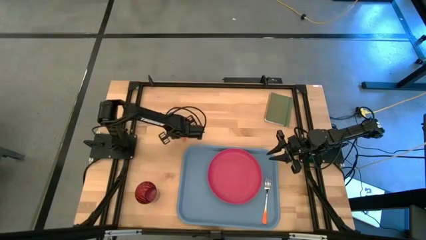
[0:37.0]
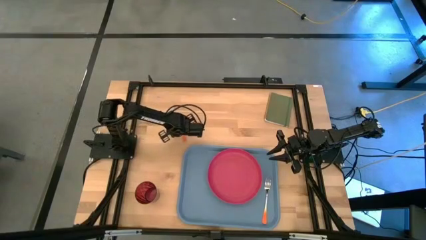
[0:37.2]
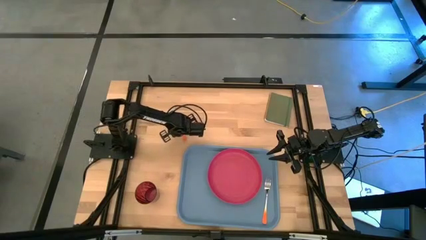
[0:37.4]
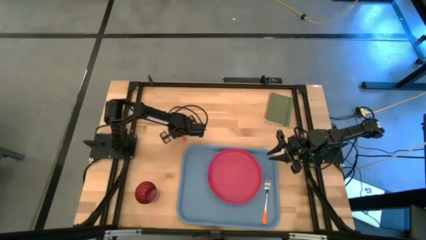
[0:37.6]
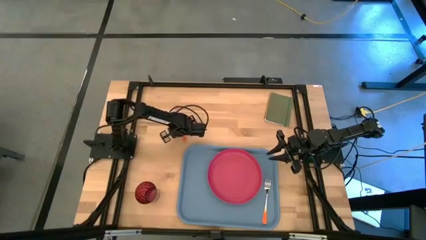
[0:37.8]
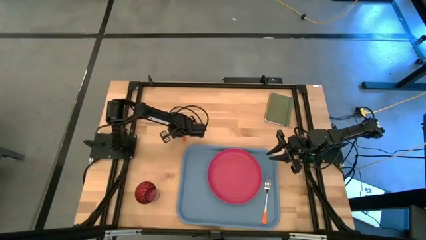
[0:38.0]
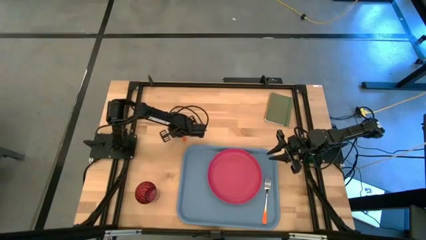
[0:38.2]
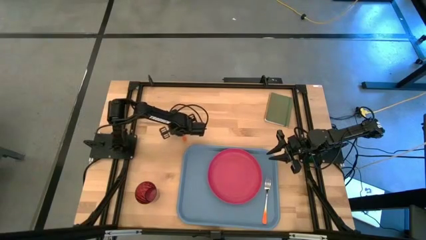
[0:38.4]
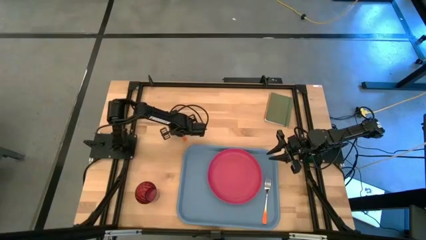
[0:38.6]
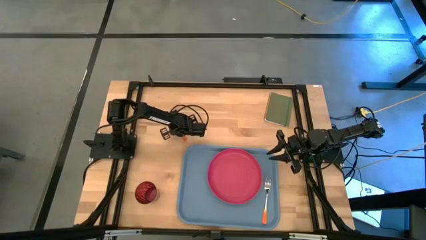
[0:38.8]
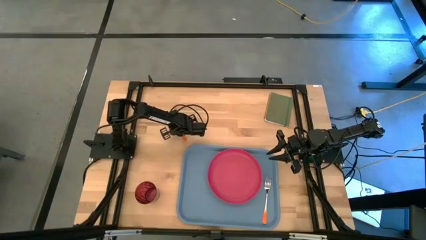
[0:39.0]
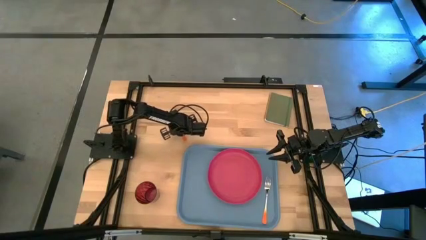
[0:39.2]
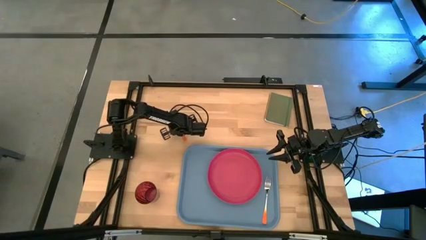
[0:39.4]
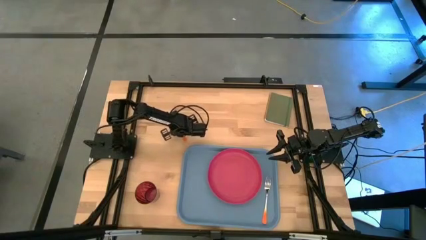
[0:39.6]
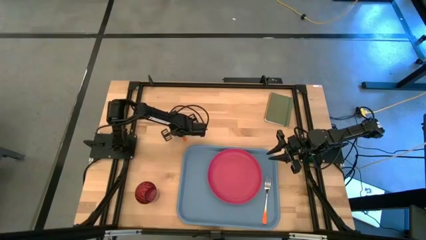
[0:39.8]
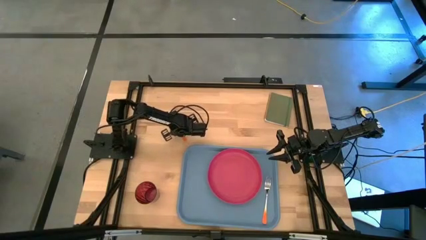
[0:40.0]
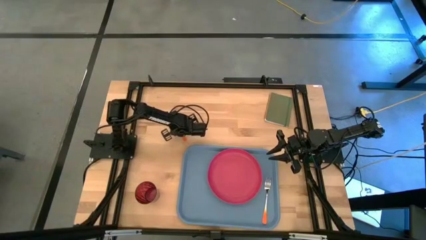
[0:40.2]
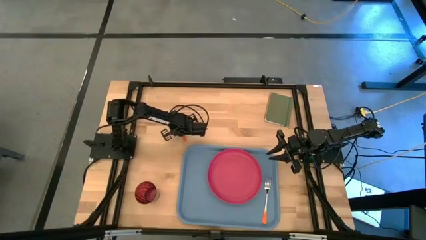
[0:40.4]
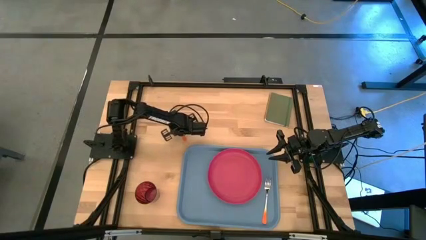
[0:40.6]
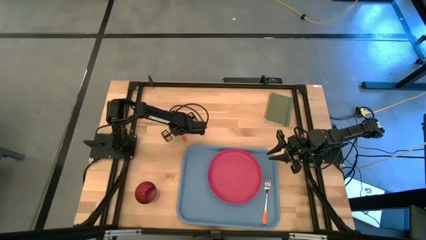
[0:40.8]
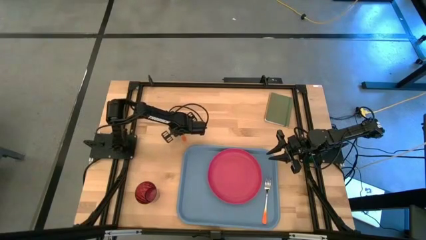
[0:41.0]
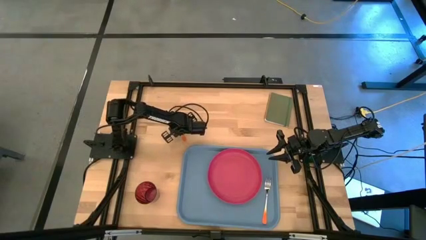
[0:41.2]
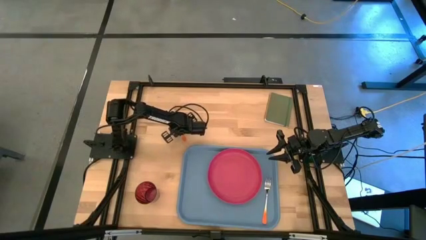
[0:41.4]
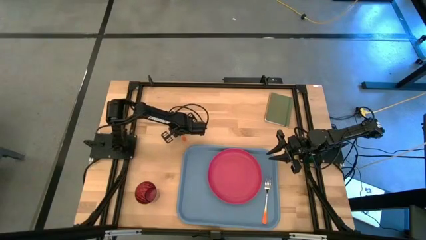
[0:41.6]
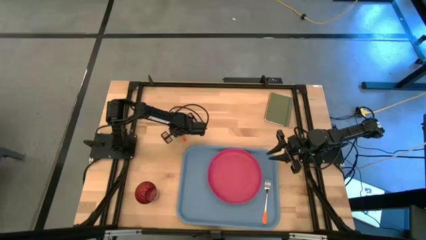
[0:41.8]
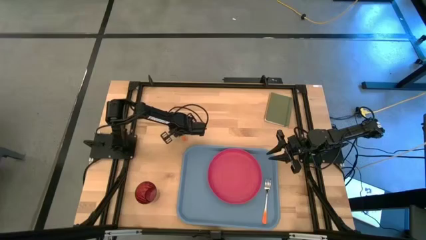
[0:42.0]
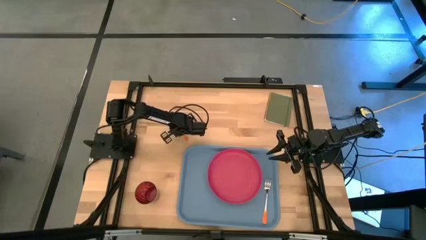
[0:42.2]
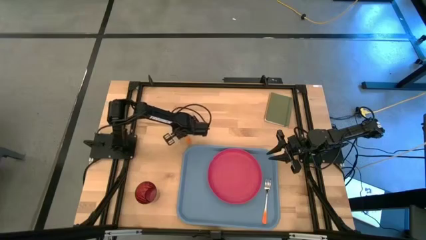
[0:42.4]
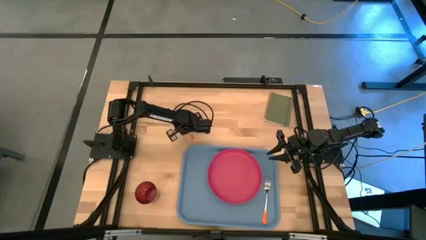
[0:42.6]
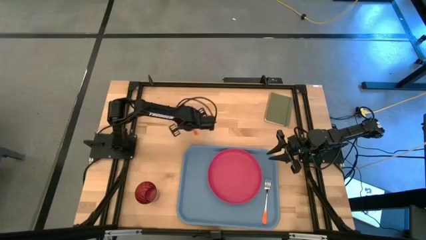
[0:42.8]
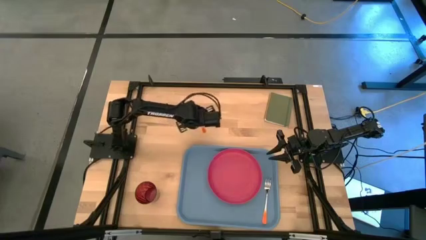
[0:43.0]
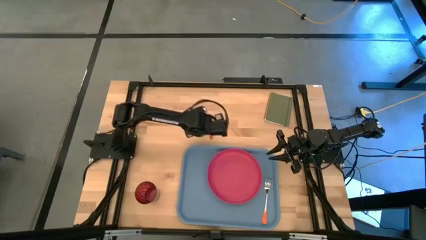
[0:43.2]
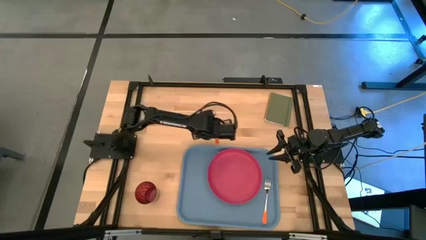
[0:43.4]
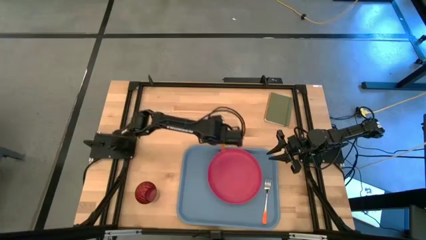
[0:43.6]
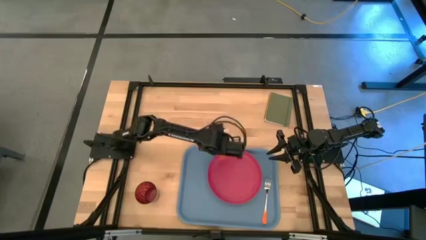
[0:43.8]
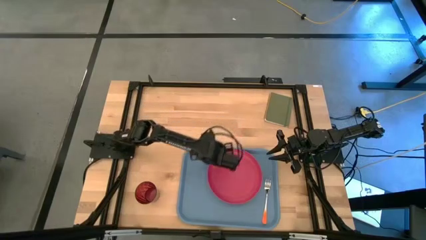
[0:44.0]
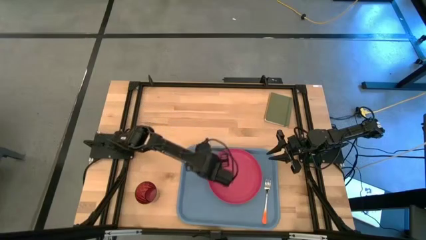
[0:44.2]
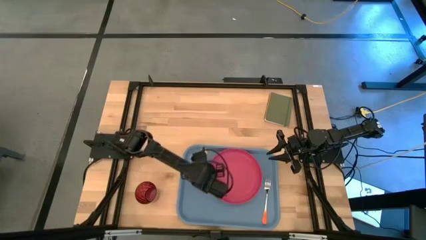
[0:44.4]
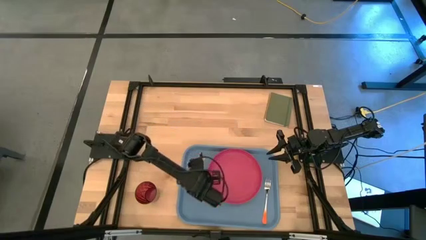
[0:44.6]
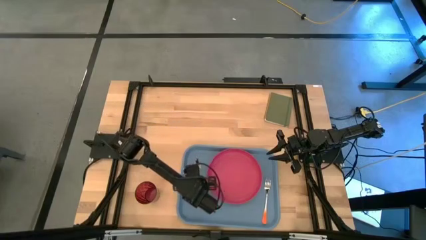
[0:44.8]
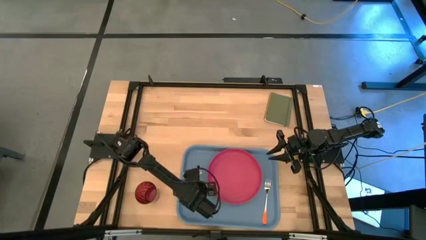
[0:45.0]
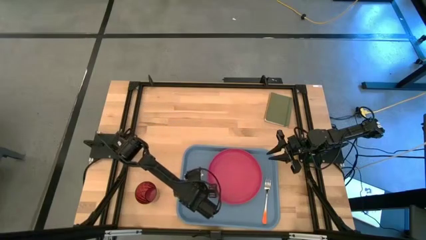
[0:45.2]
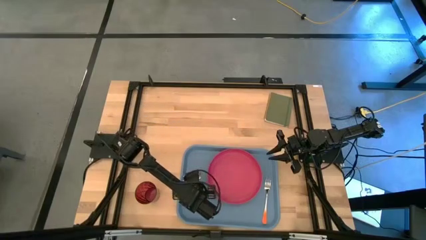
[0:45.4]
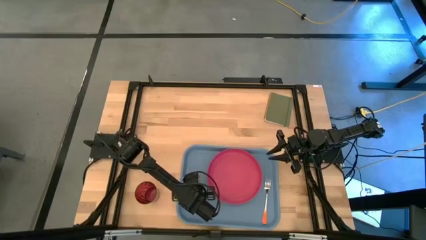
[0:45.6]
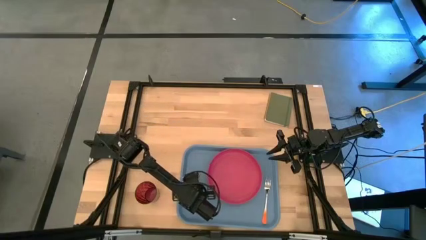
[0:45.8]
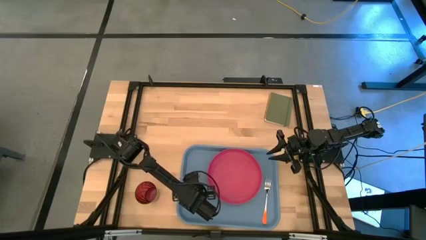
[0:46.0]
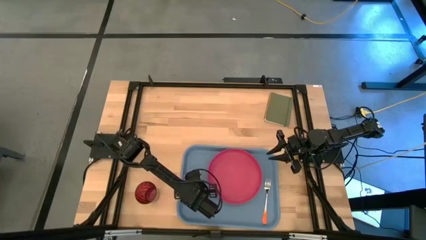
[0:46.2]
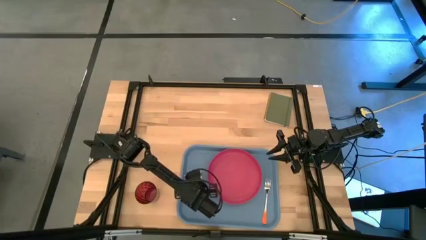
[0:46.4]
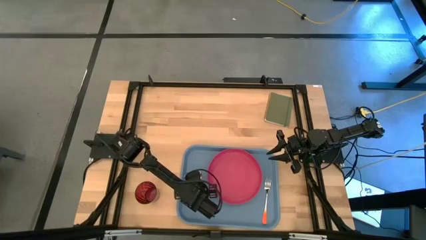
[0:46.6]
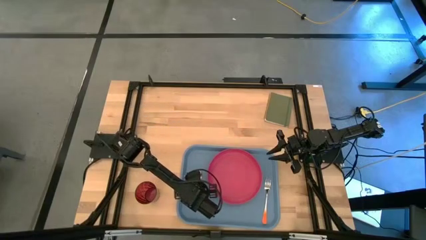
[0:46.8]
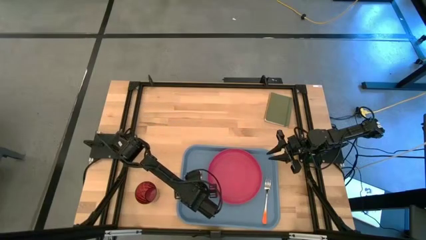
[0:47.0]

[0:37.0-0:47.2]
Task: Pick and place plate/cup/fork/spoon on tray
Put the orange spoon to the left of the pink serving tray

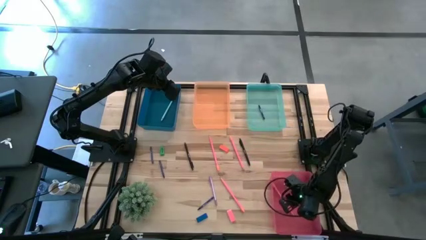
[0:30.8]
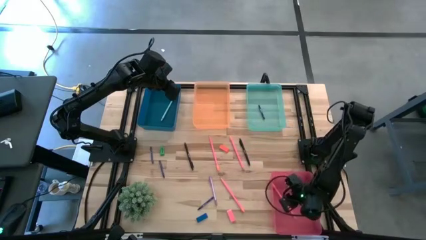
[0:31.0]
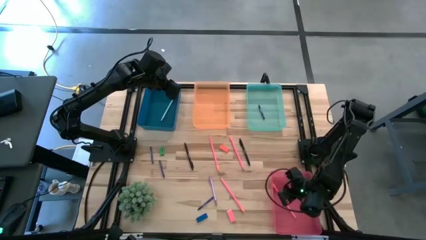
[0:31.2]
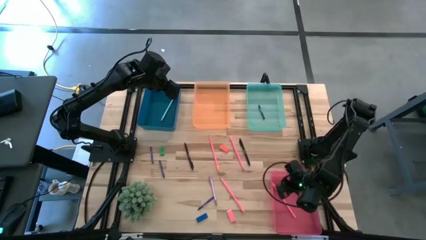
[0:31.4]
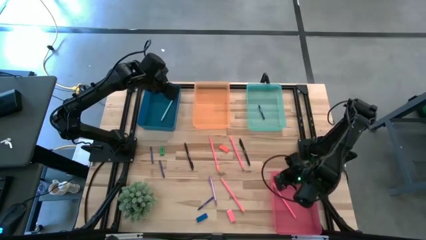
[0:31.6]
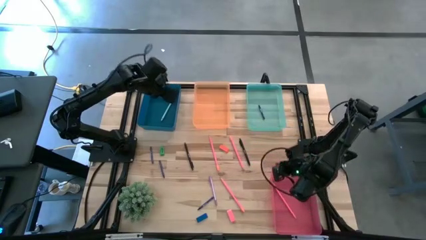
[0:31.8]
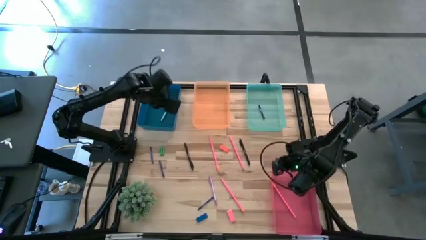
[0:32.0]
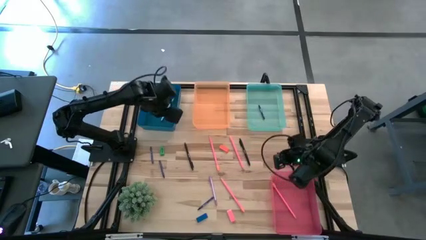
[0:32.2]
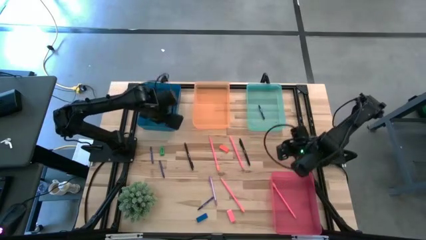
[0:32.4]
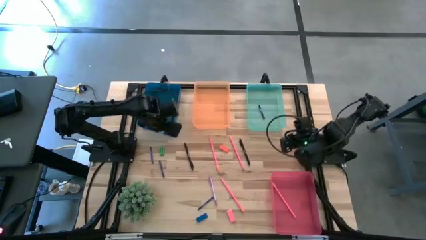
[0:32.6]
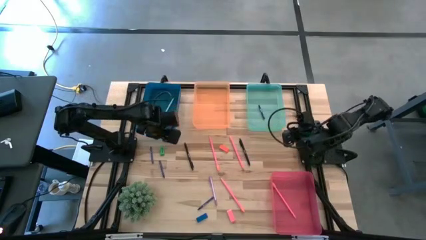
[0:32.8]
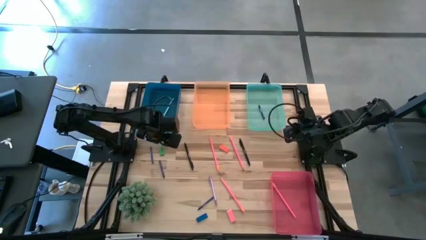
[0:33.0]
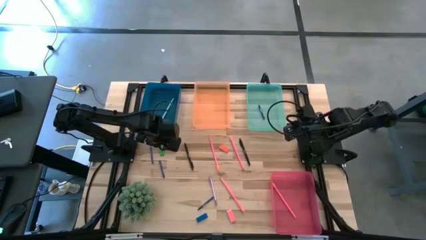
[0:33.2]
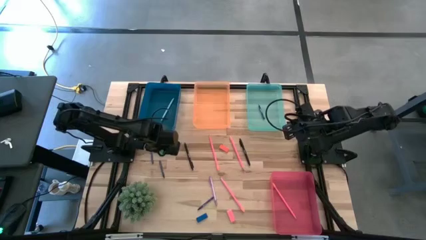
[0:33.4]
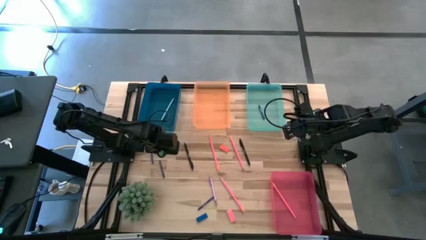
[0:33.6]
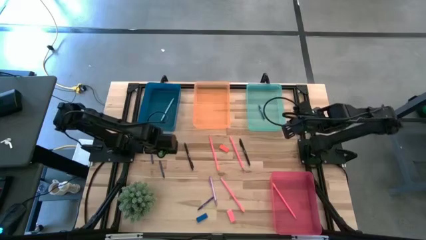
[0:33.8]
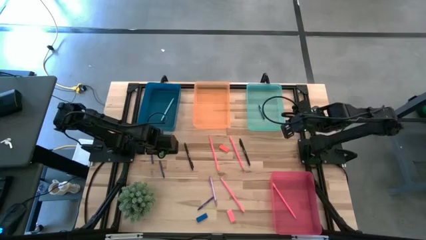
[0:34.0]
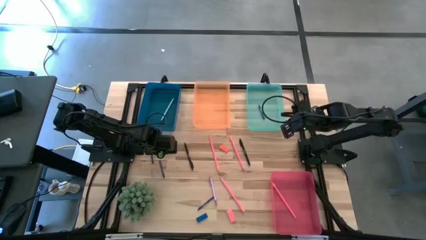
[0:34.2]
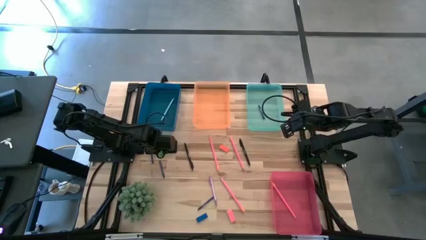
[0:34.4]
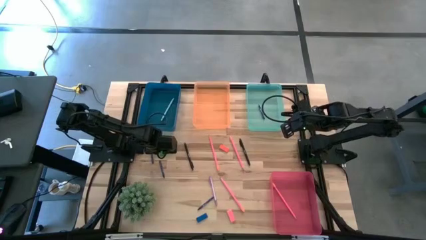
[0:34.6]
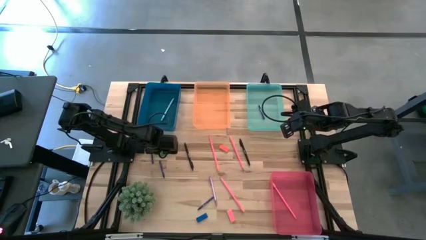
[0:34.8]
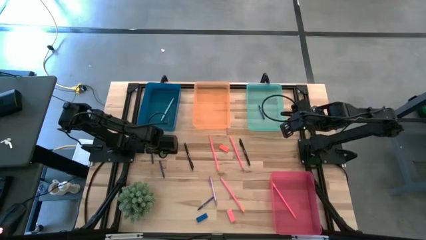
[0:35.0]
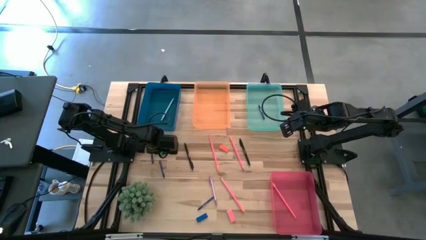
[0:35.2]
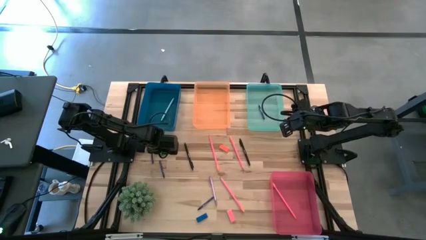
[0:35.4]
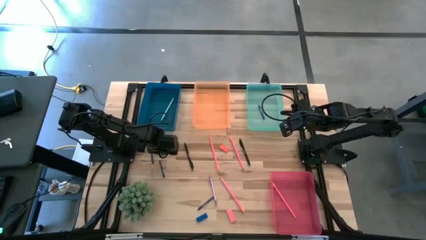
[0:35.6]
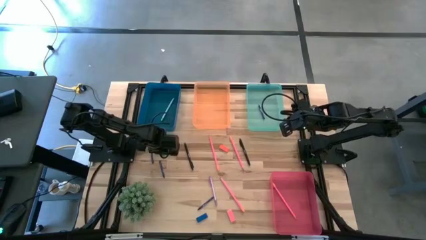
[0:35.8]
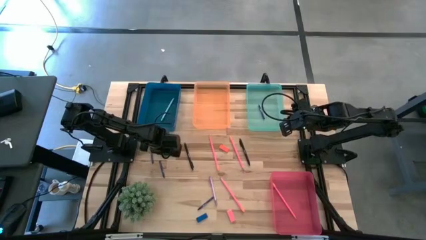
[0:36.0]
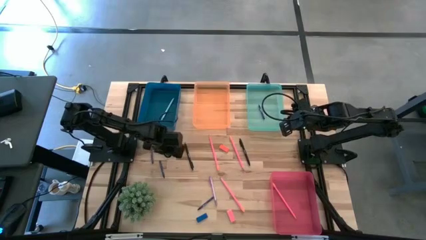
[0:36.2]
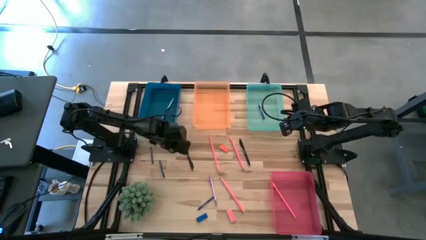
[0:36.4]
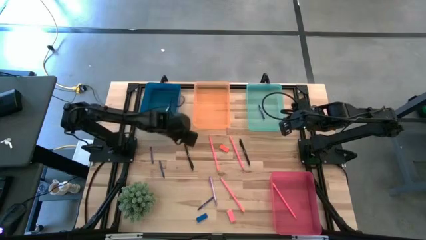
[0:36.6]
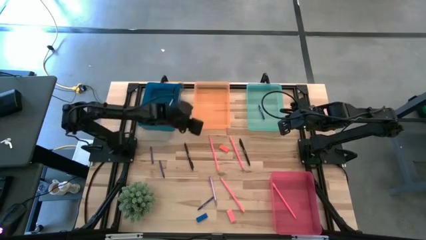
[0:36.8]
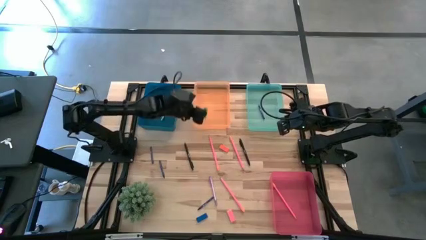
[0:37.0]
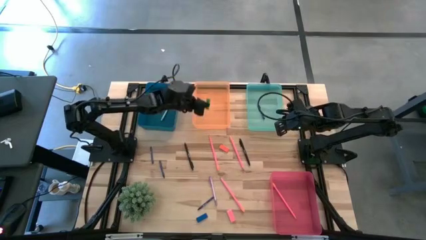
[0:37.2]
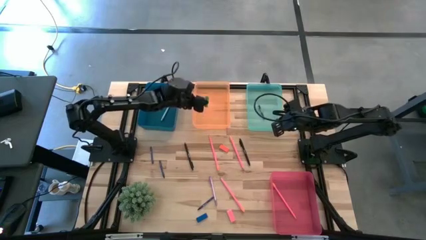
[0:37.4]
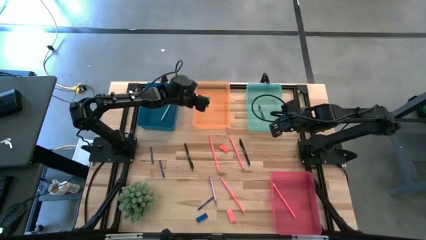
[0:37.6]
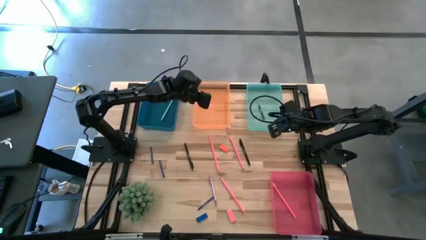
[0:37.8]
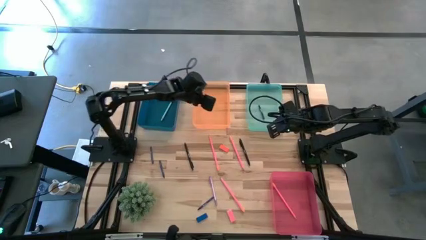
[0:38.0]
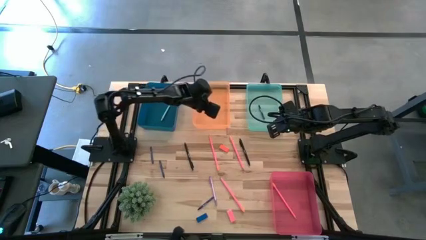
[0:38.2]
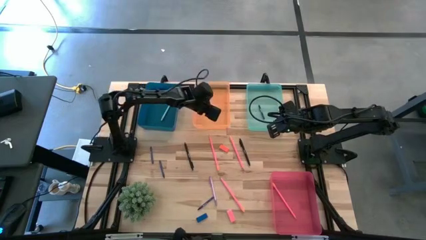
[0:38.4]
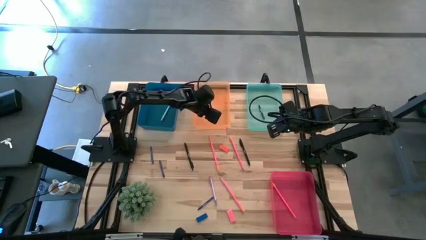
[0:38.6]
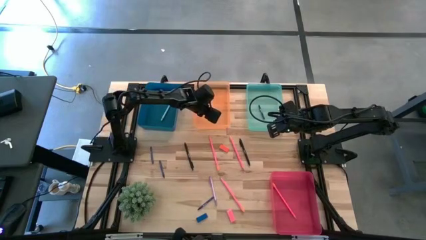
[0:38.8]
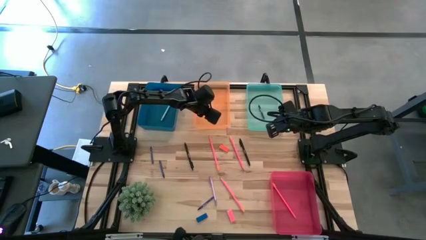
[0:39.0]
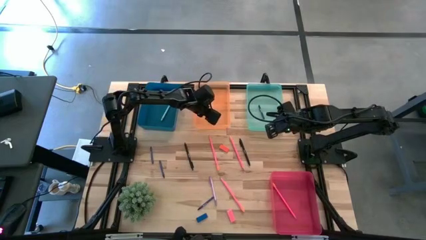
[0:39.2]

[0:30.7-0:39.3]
Task: Sort crayons/erasers/pens/pencils in bins
Put the green eraser into the orange bin
